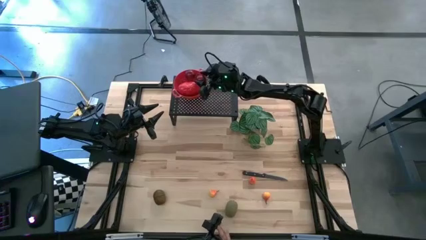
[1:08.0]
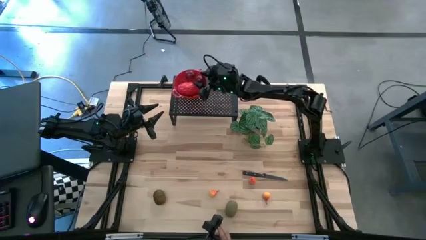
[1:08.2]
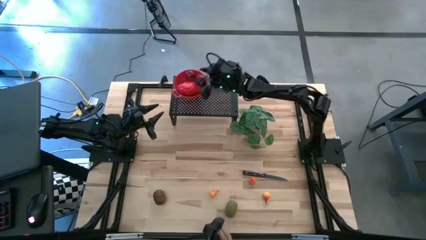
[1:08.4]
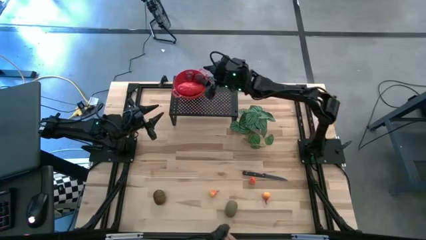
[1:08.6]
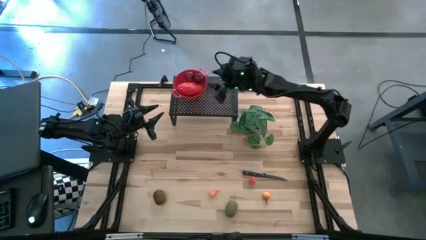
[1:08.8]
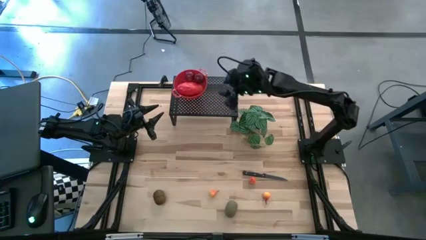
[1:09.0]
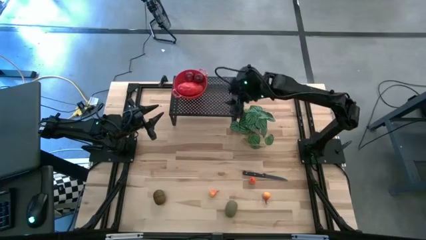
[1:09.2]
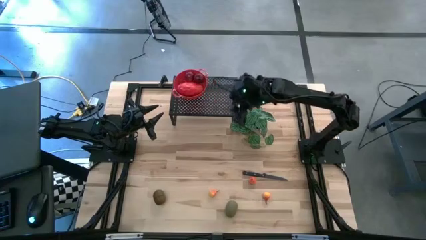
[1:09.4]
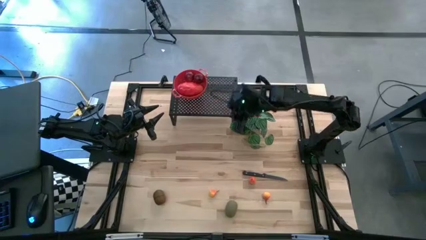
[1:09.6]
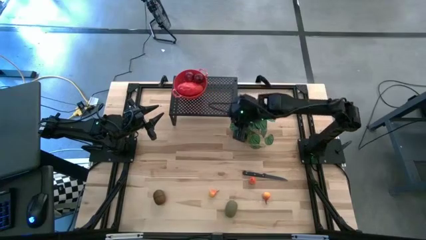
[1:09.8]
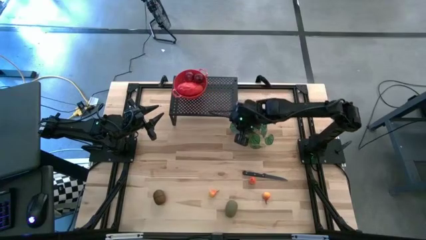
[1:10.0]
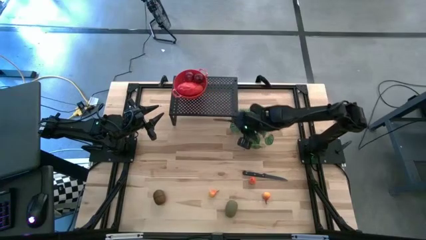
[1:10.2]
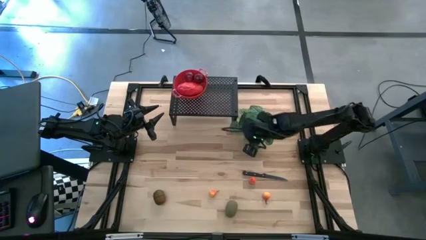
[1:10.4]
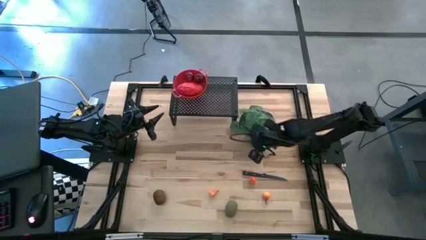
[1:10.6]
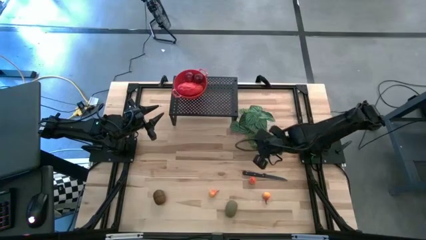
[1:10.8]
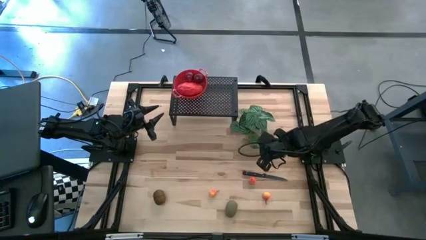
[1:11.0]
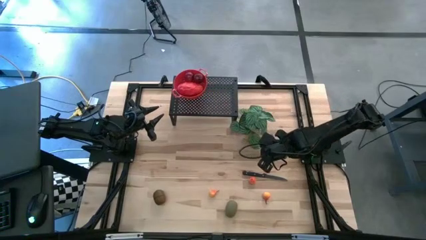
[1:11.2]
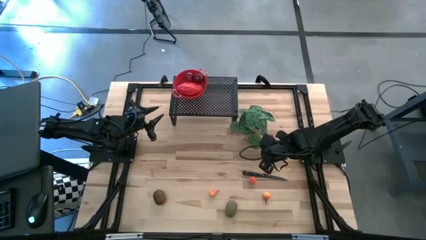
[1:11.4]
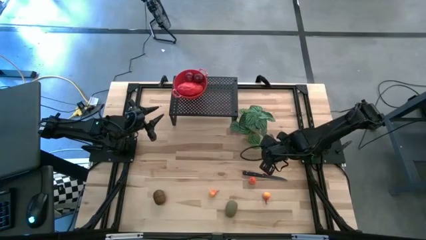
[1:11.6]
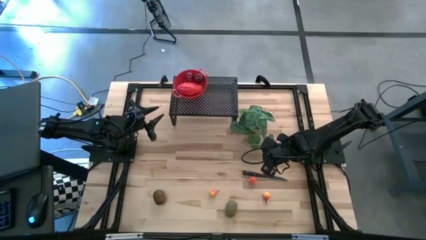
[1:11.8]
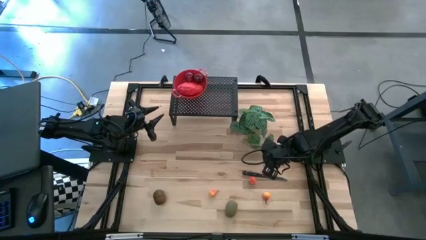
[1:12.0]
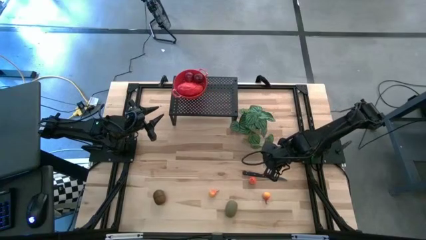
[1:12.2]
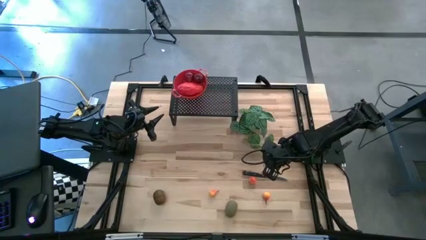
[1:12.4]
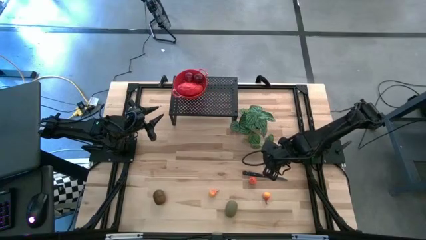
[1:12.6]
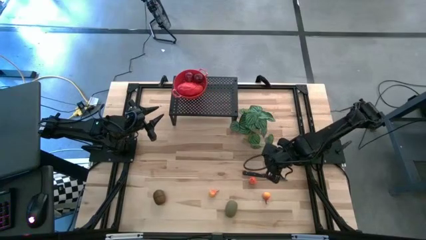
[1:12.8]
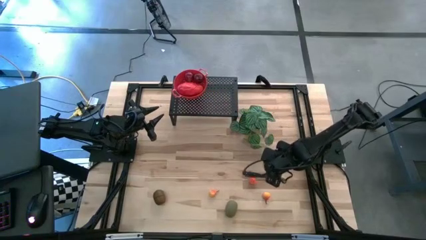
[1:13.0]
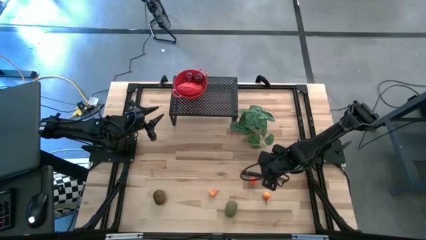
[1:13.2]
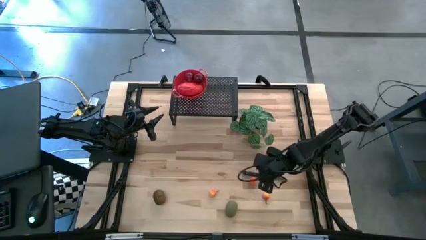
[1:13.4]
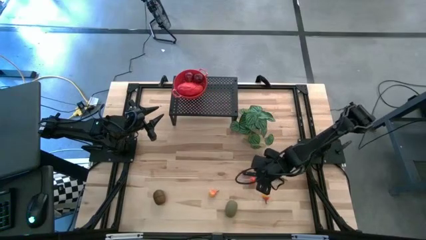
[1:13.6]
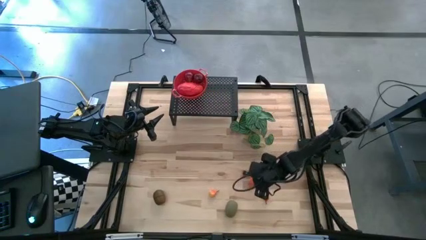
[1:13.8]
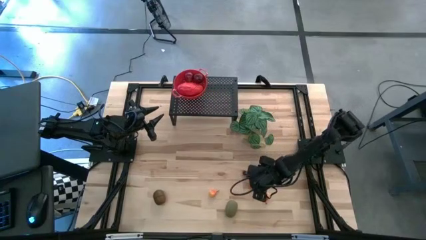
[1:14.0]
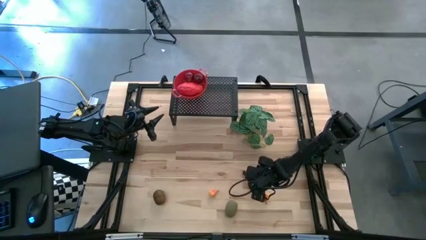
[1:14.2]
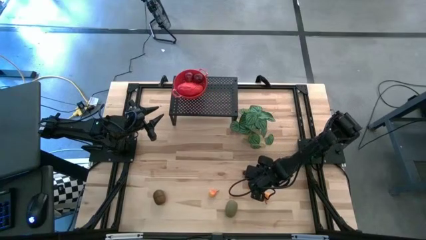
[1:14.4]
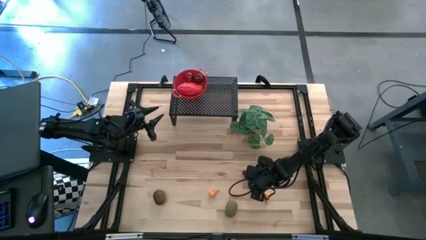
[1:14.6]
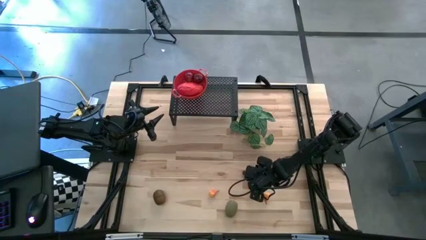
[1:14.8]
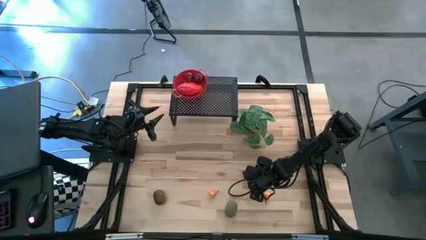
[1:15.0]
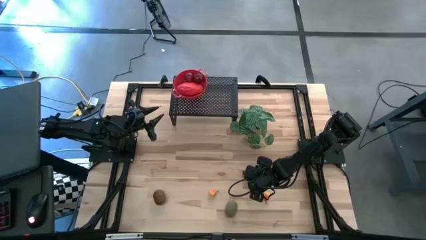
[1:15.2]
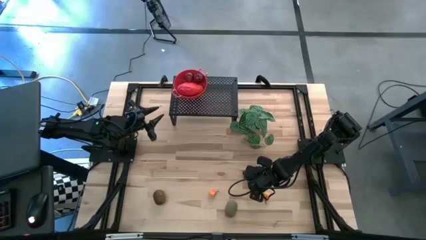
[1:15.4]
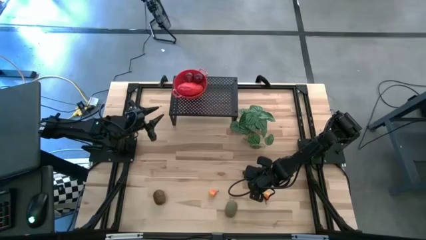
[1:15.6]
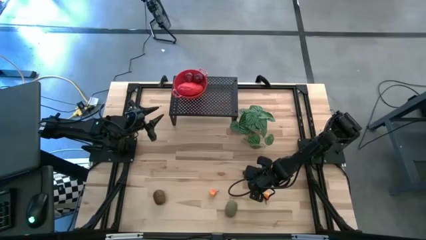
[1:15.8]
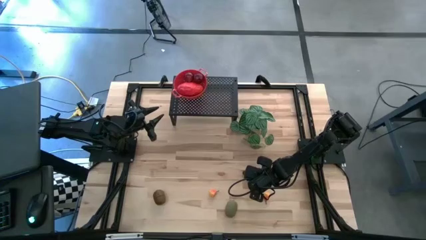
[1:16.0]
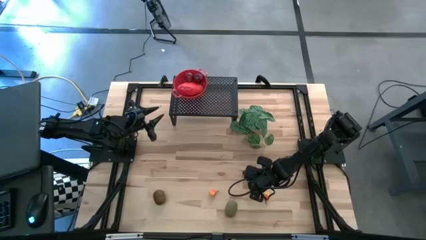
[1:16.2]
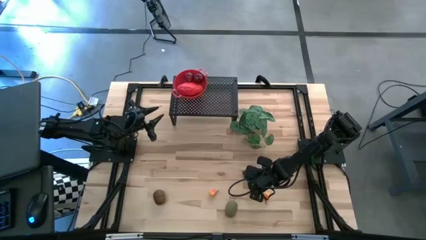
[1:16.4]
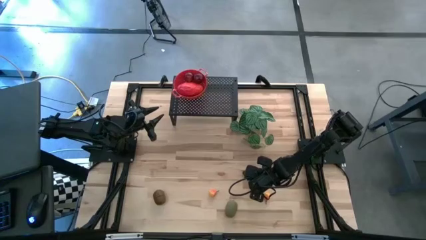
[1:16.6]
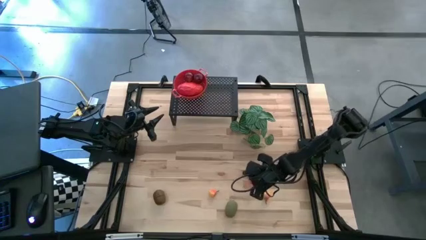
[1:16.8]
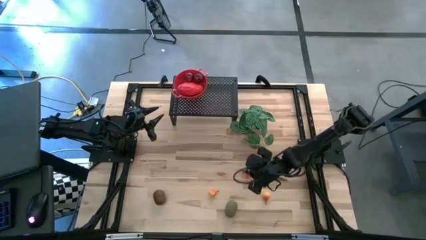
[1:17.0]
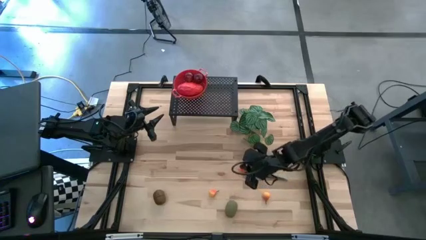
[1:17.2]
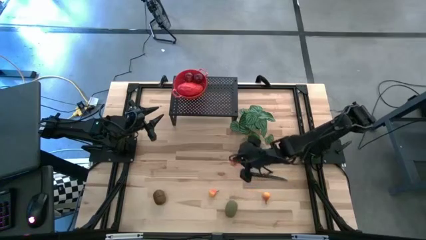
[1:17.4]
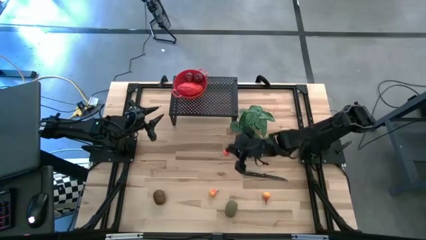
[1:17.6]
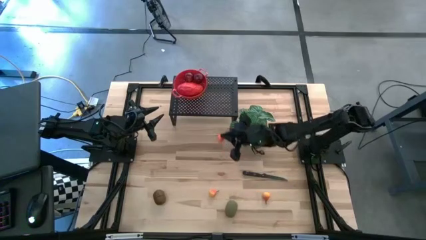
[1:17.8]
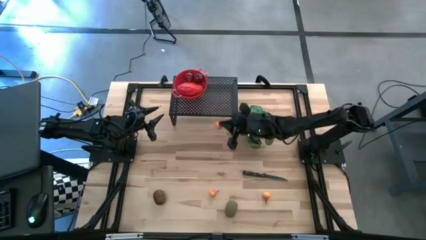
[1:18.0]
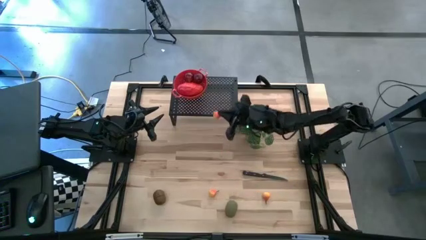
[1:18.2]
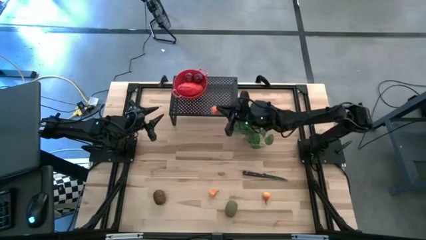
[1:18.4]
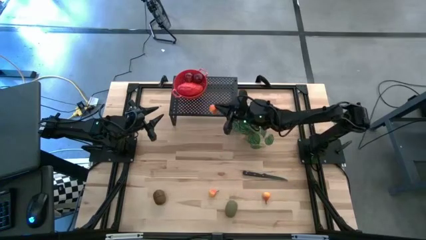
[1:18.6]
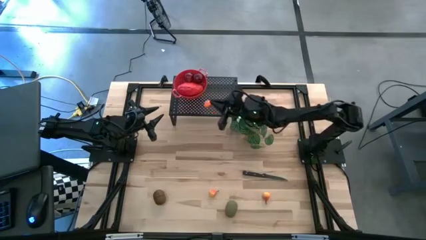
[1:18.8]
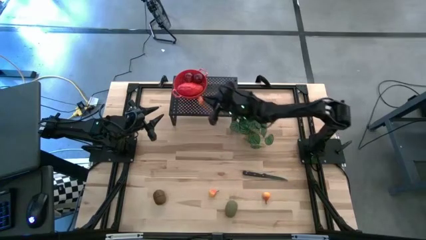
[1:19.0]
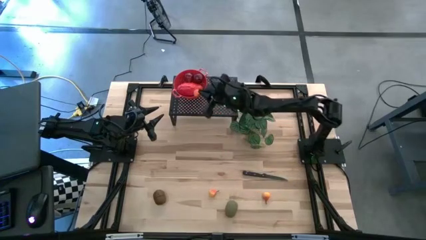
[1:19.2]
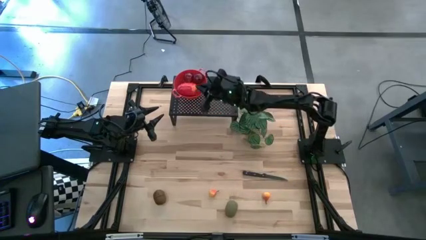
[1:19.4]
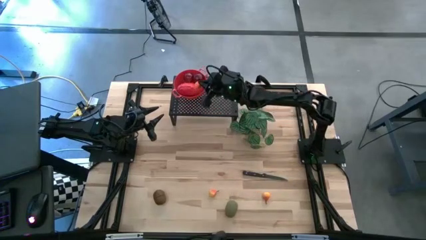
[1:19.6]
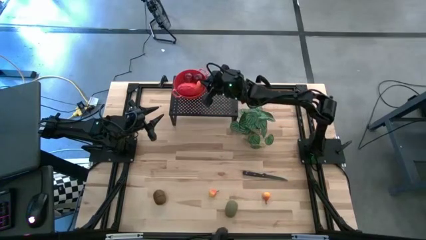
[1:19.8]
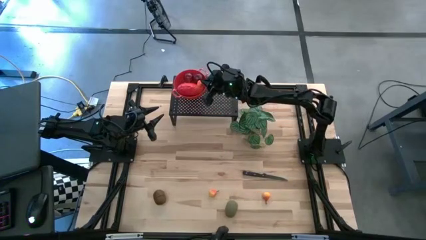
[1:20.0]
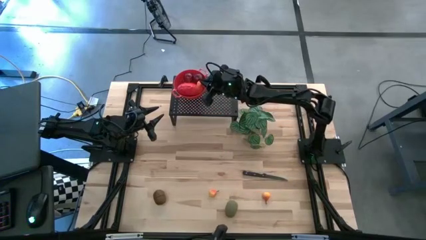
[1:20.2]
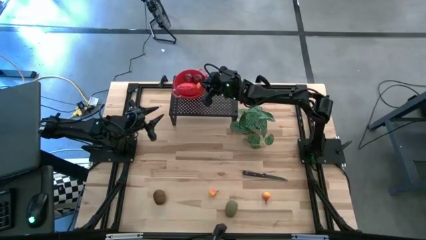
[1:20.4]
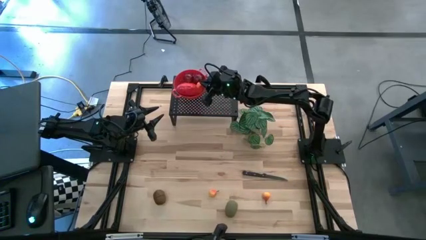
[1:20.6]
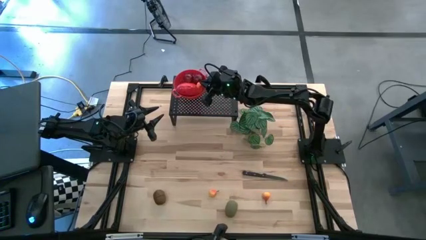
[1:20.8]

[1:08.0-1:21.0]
Task: Pick & Place Fruit
Put the top yellow pear in the red strainer bowl on the shelf
